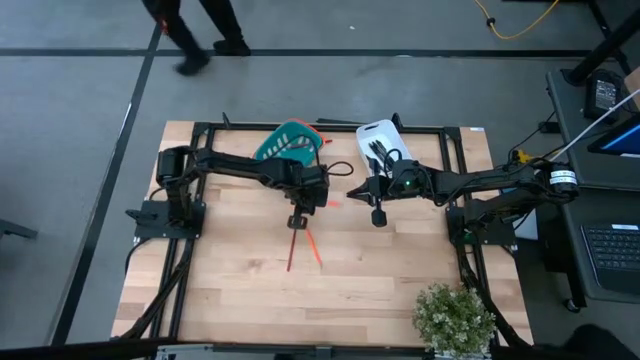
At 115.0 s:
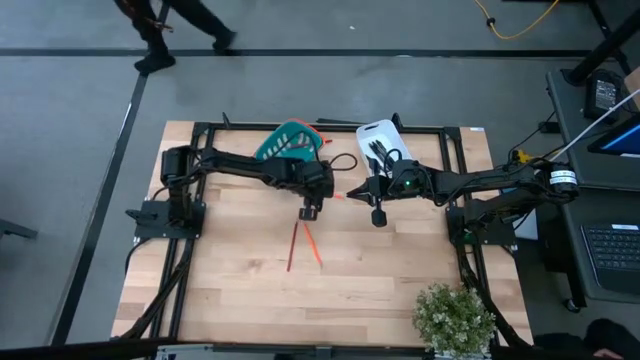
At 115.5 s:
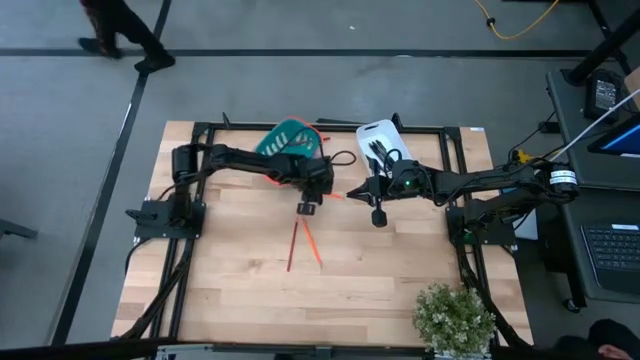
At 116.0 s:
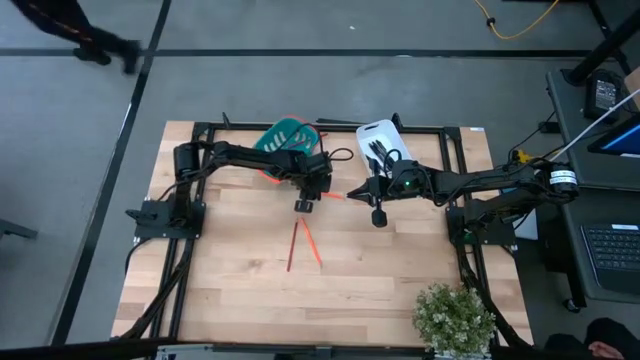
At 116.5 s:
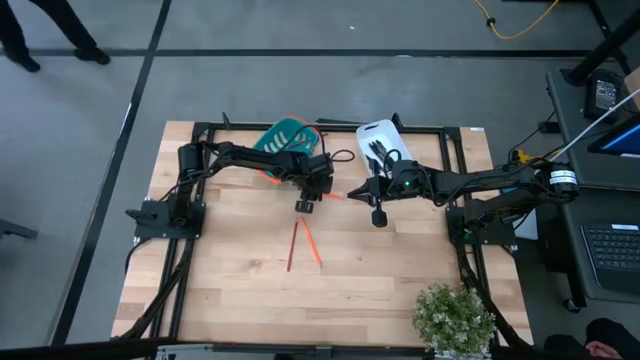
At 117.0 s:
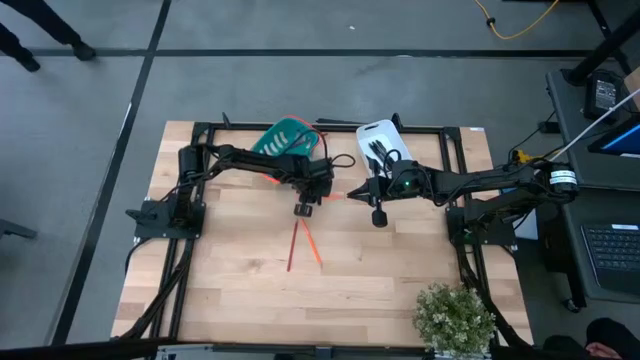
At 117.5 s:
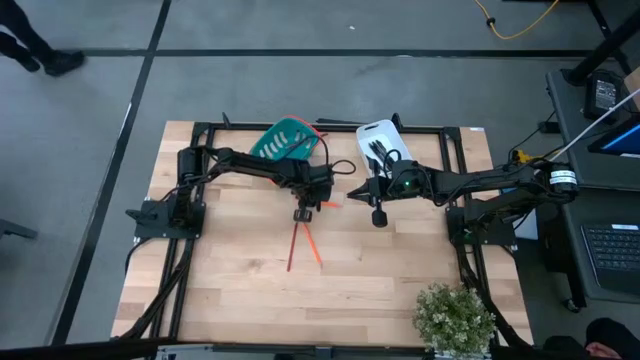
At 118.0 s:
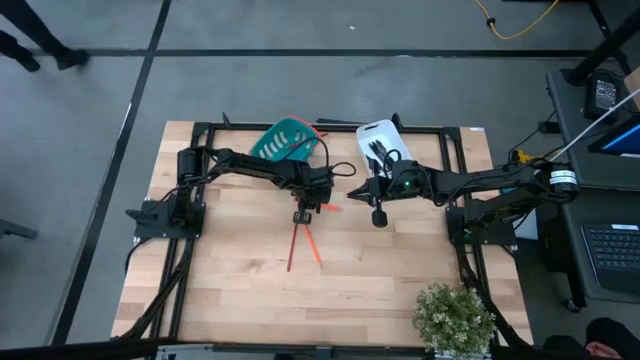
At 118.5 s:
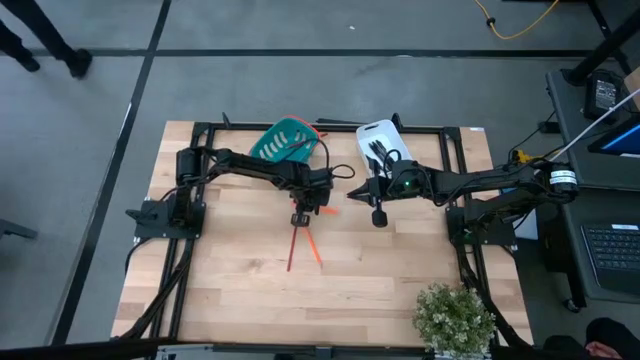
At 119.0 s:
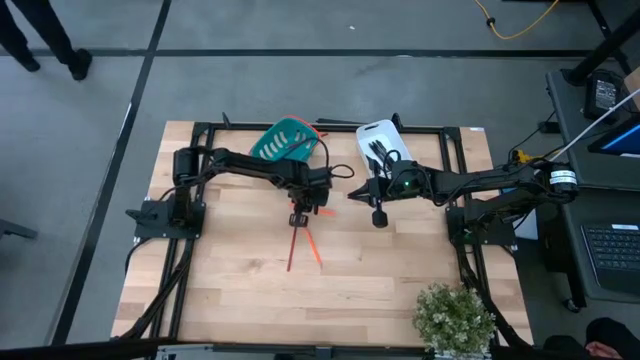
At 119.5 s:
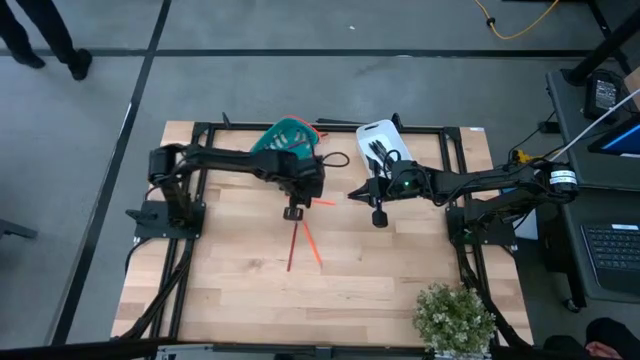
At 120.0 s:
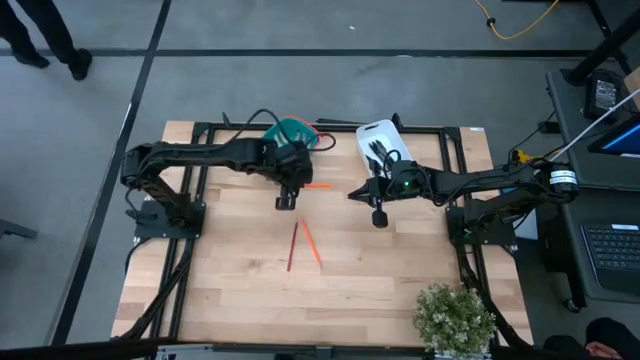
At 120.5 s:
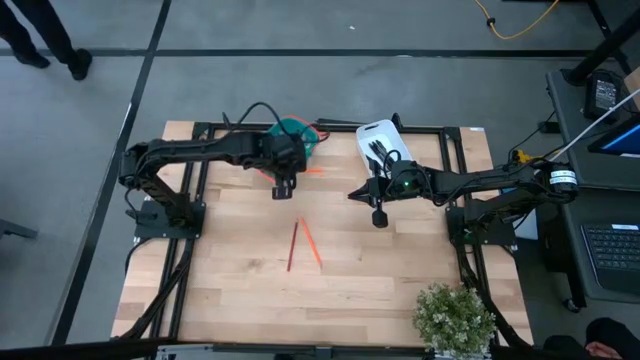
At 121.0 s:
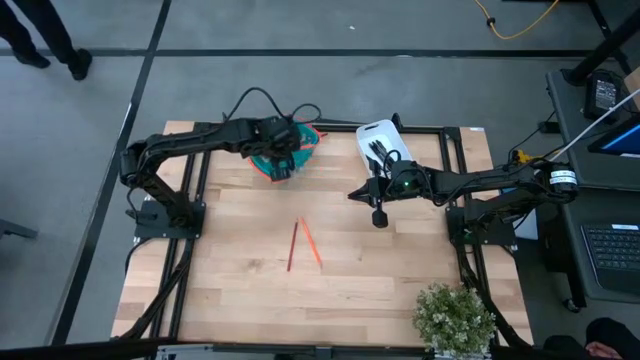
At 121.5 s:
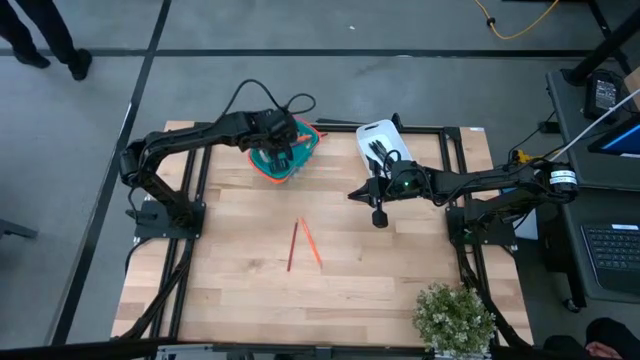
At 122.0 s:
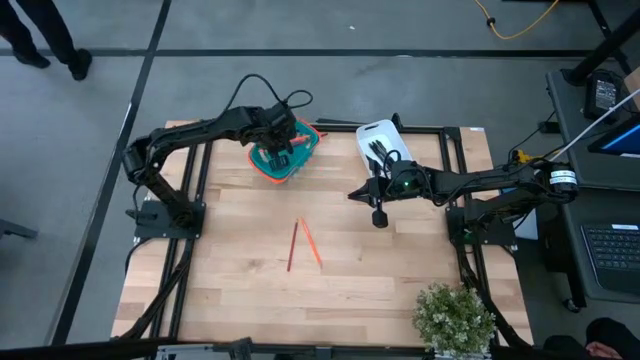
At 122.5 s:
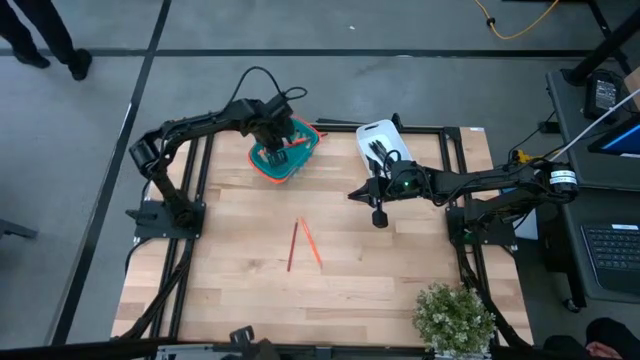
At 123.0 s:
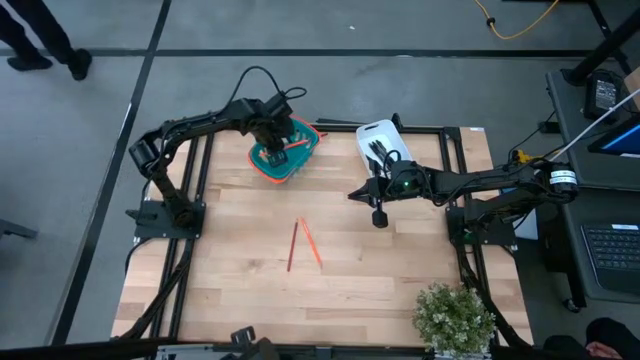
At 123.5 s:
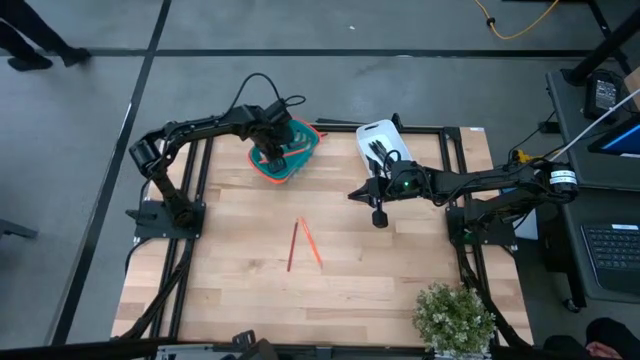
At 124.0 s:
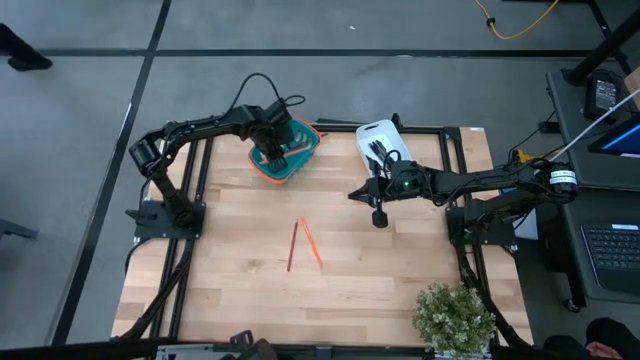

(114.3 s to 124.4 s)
Task: Sort pens & pencils
Put the orange pencil into the blue bin

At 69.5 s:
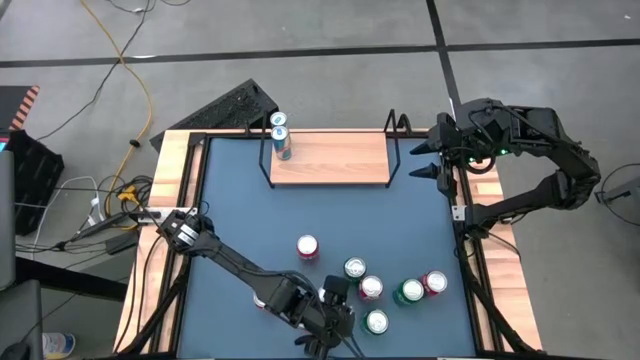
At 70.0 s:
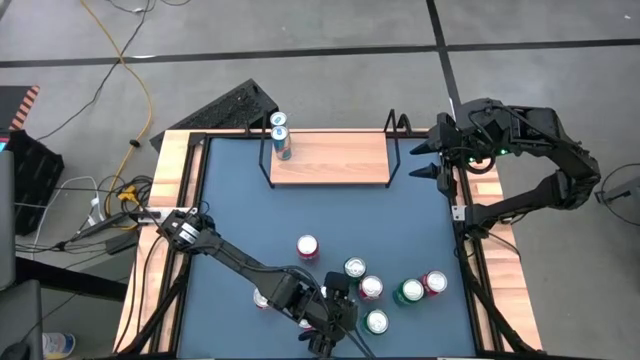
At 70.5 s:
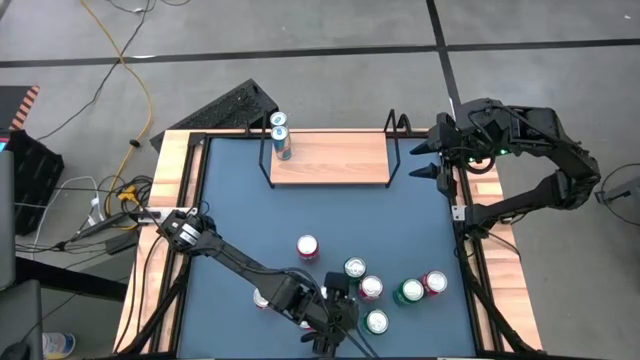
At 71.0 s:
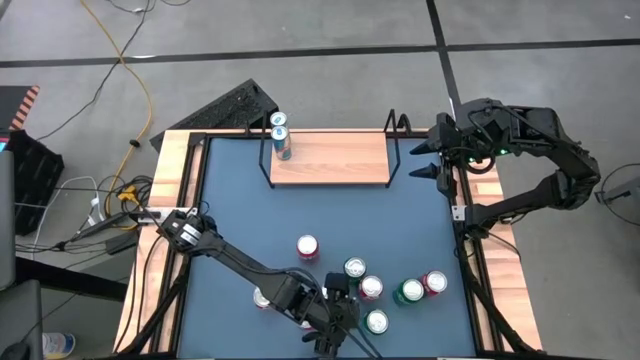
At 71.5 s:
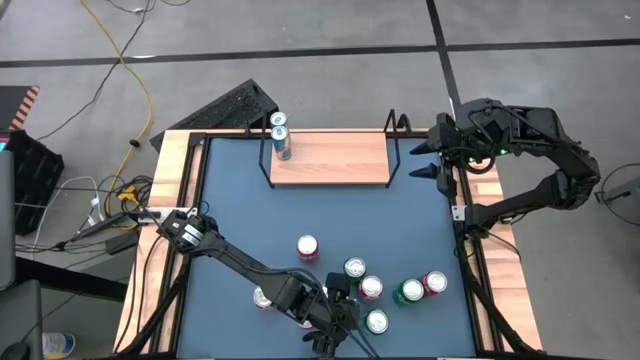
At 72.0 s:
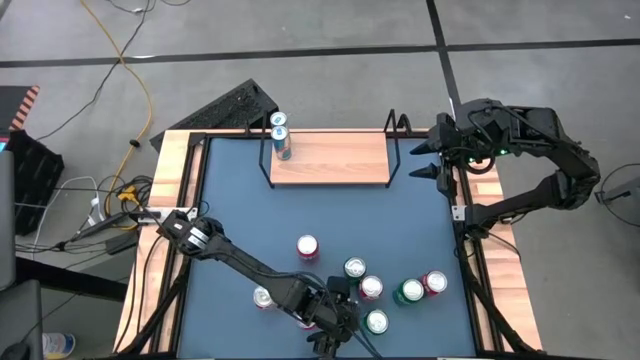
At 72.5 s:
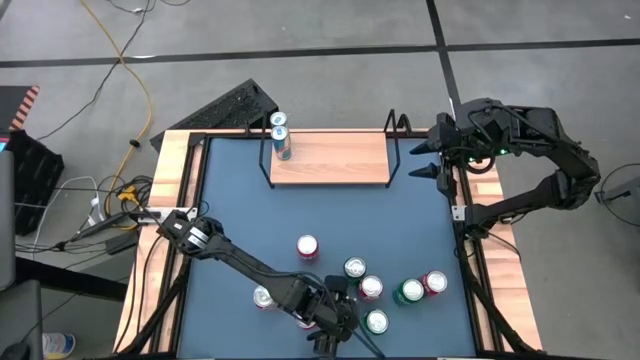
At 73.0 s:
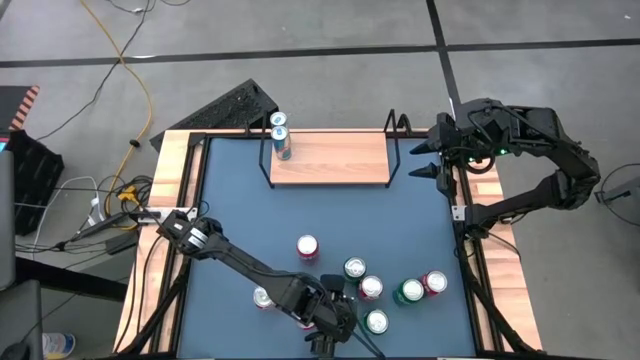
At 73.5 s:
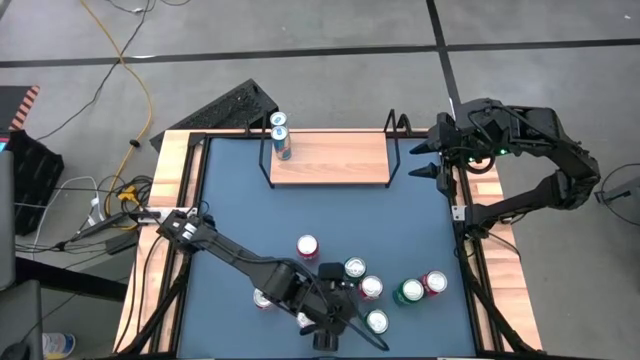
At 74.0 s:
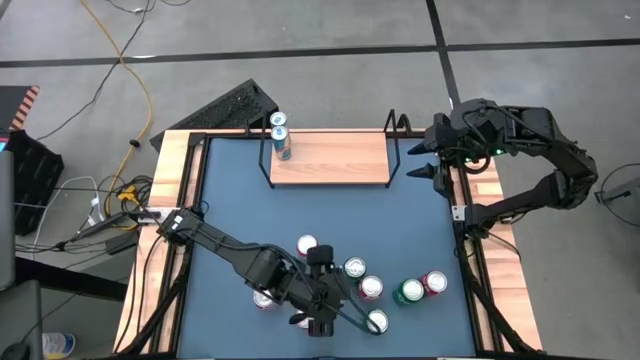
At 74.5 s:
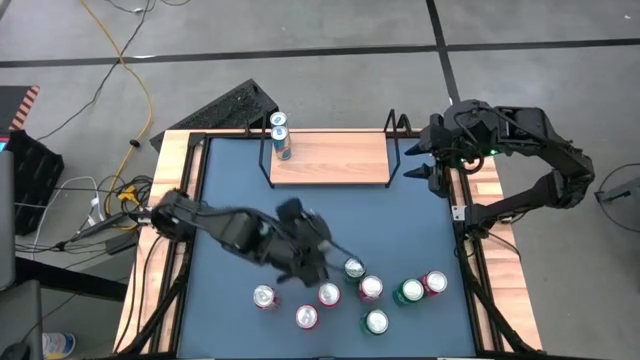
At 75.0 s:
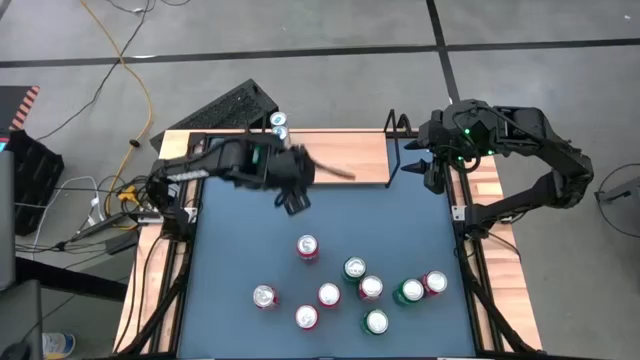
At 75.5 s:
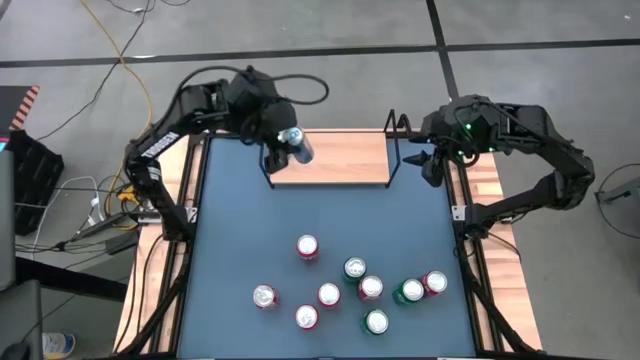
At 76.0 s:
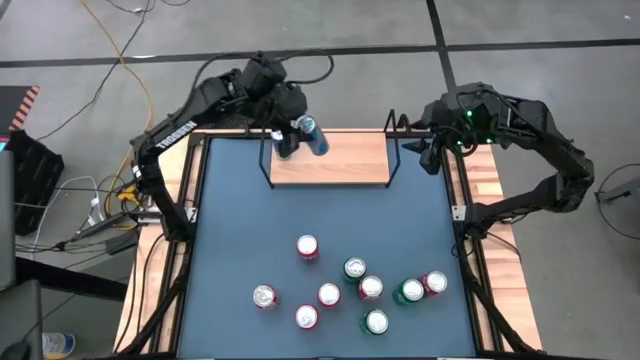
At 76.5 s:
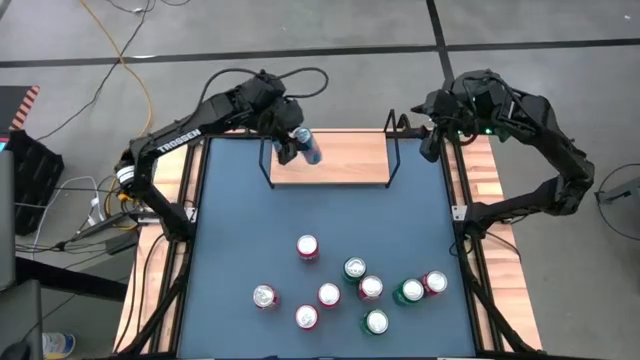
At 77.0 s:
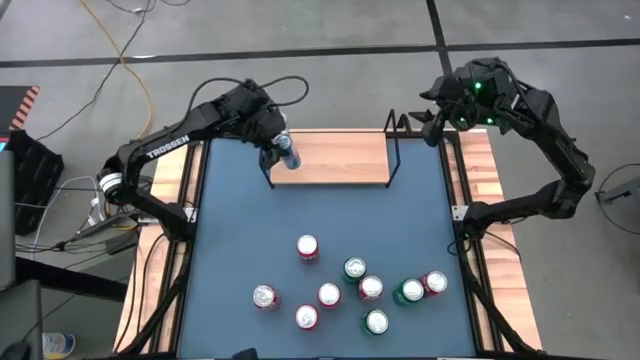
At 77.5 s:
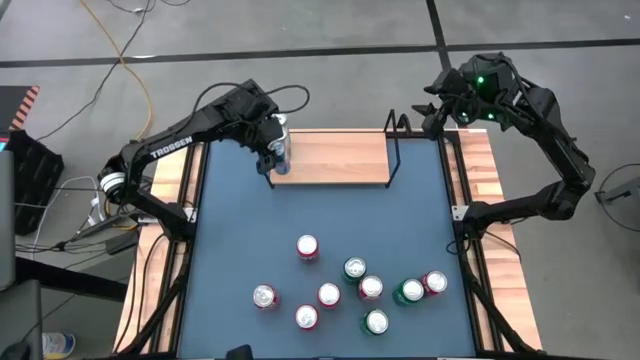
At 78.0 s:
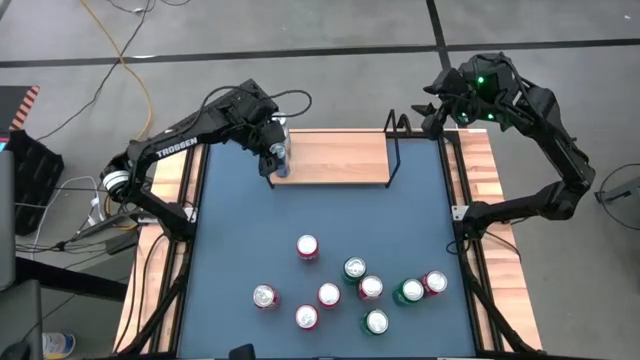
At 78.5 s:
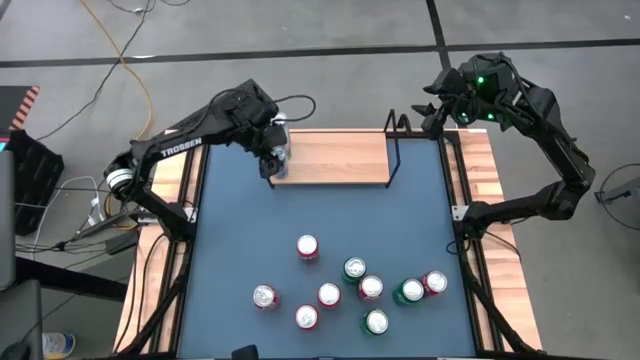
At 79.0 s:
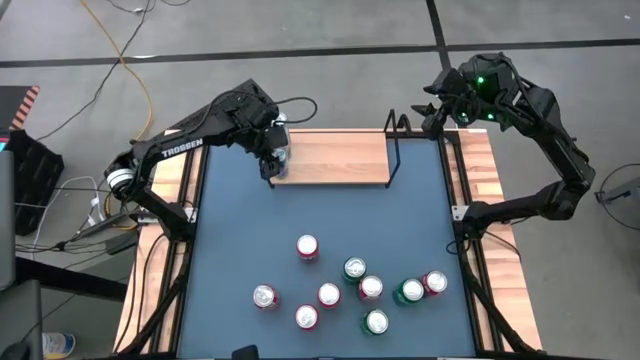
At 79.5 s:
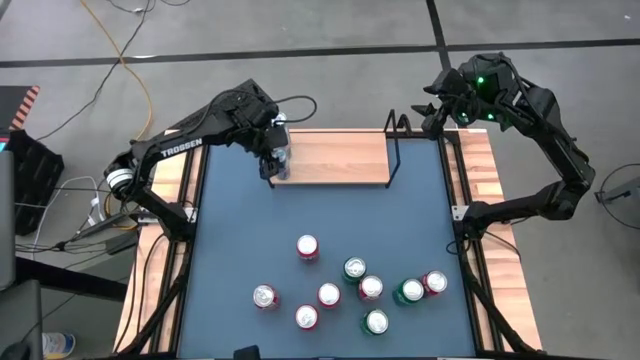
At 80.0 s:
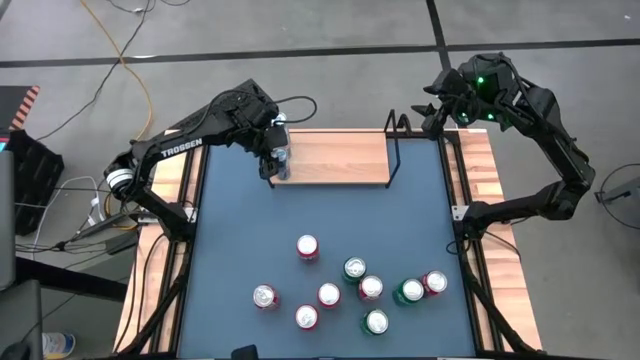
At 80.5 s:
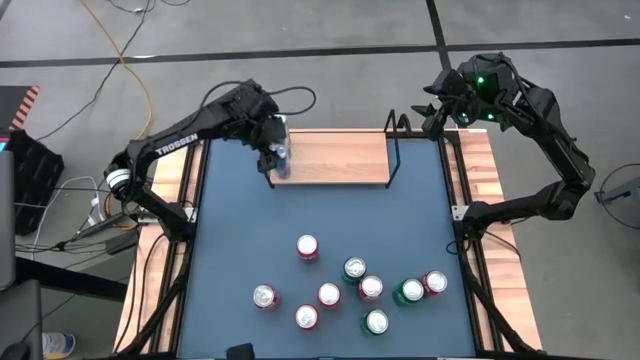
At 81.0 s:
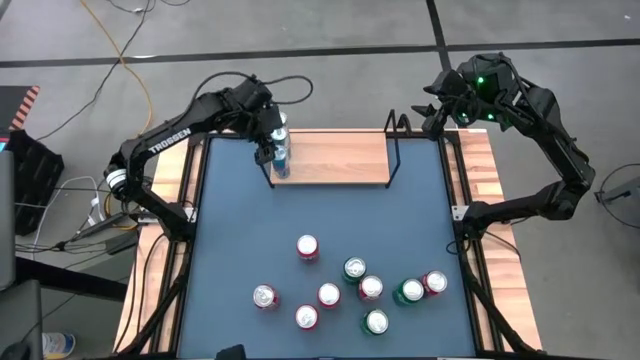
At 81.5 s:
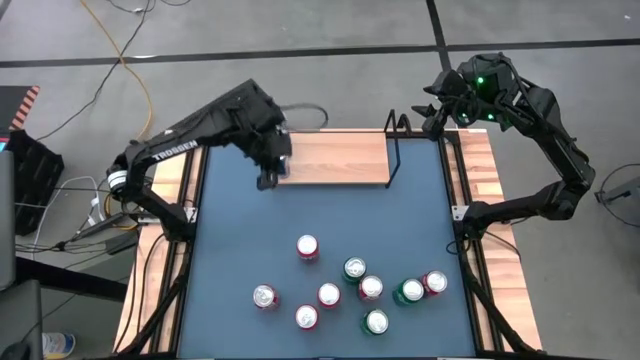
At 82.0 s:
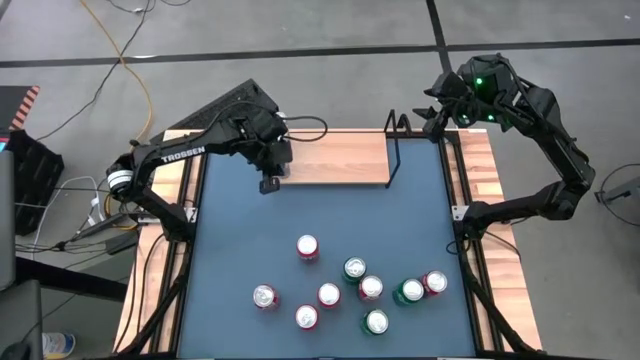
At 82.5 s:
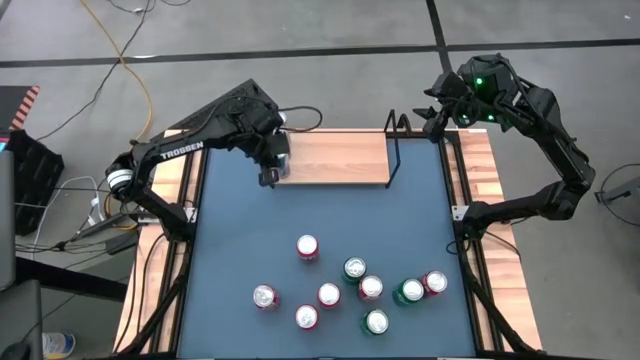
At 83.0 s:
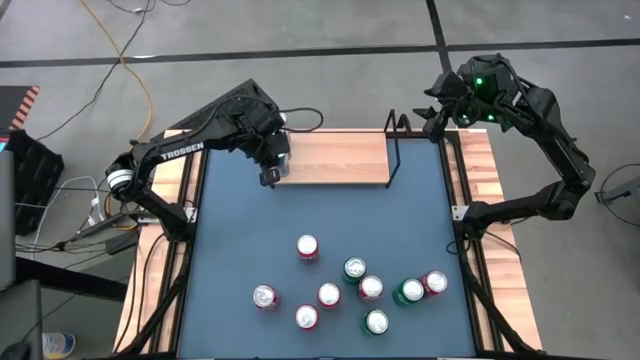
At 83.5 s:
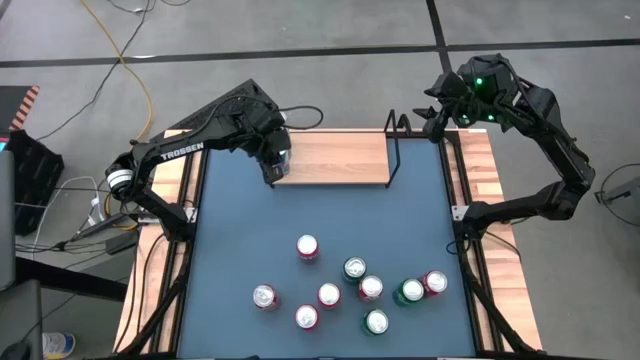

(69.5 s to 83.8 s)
Task: Place canned beverage on shelf
Put the blue soda can on the shelf aligned with the other blue soda cans
